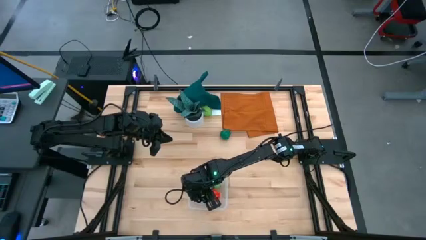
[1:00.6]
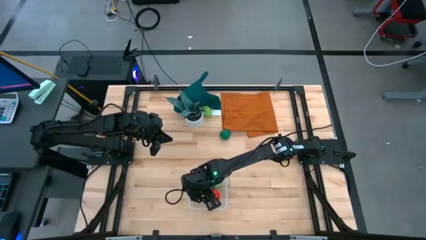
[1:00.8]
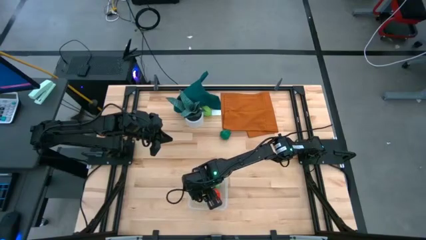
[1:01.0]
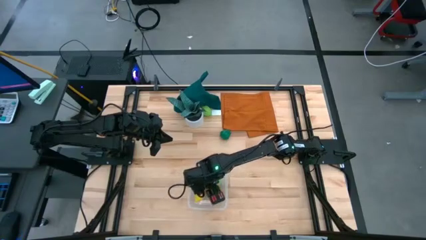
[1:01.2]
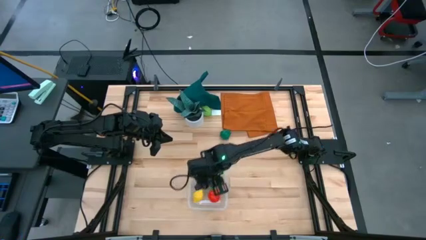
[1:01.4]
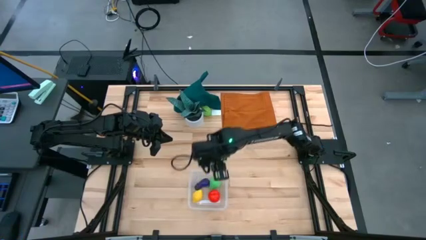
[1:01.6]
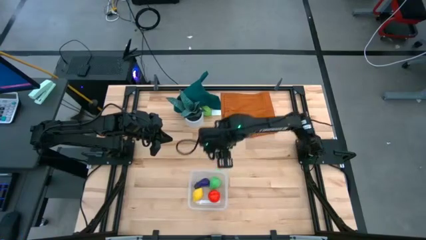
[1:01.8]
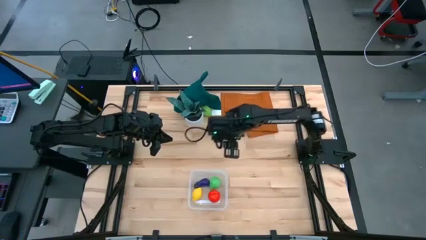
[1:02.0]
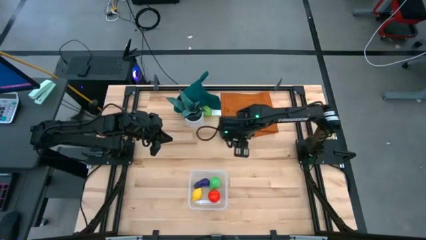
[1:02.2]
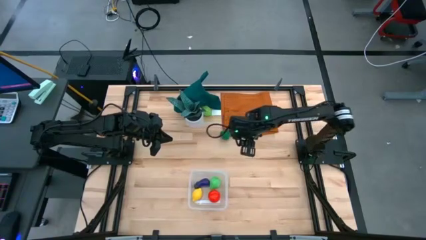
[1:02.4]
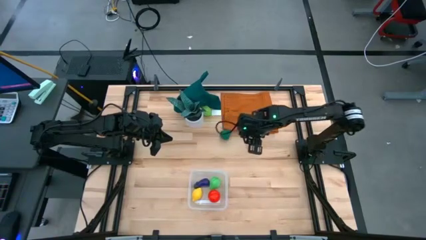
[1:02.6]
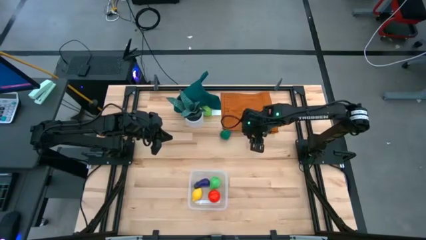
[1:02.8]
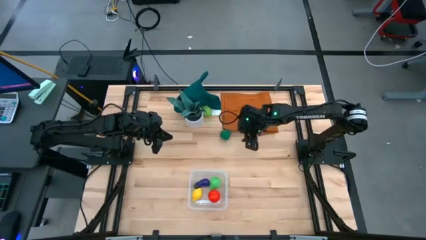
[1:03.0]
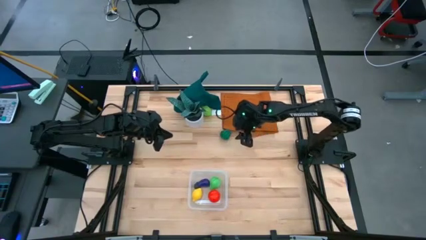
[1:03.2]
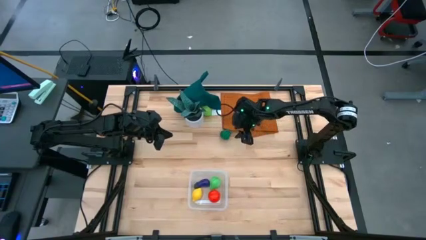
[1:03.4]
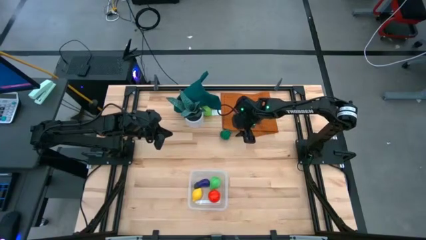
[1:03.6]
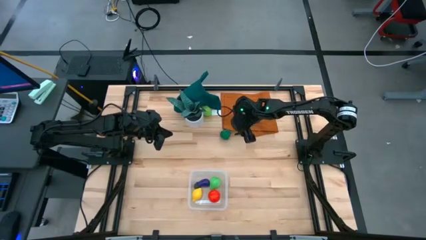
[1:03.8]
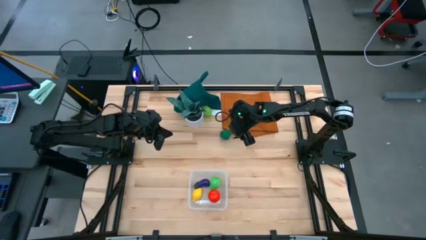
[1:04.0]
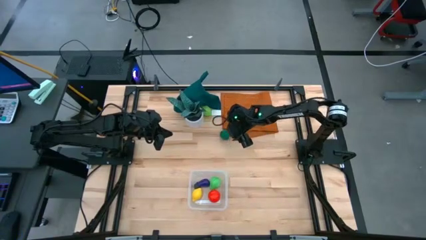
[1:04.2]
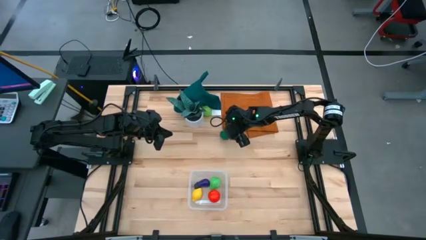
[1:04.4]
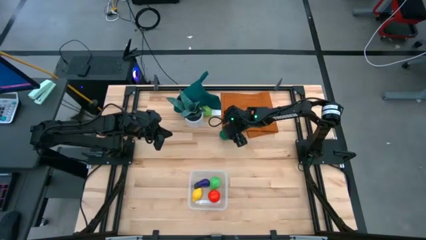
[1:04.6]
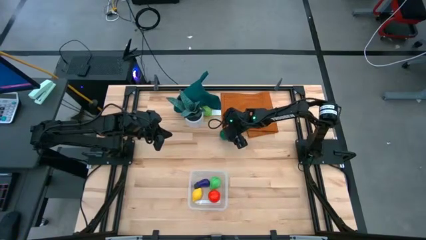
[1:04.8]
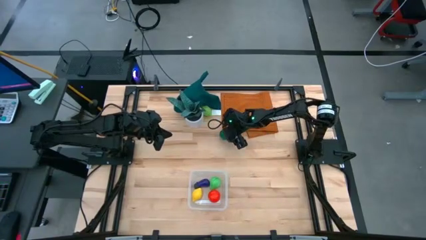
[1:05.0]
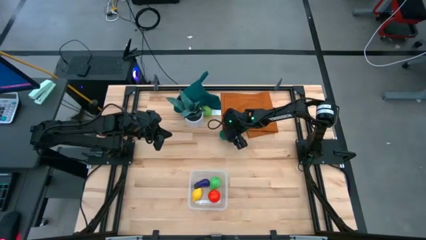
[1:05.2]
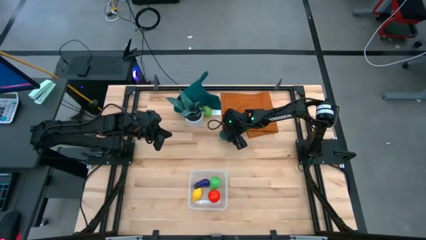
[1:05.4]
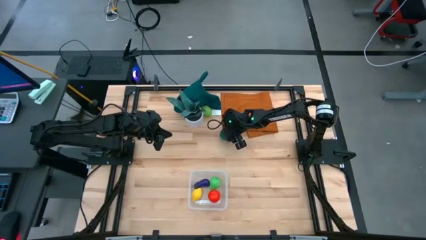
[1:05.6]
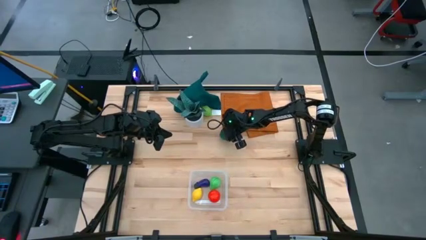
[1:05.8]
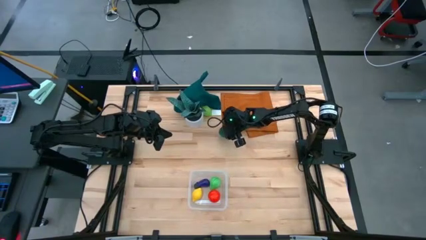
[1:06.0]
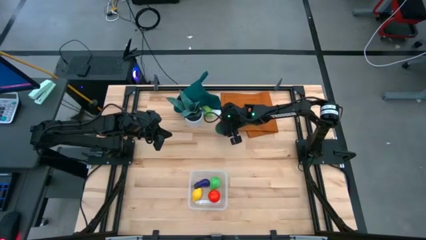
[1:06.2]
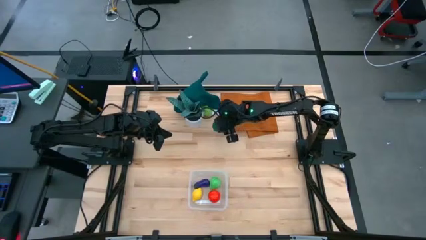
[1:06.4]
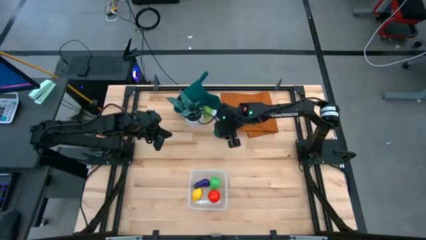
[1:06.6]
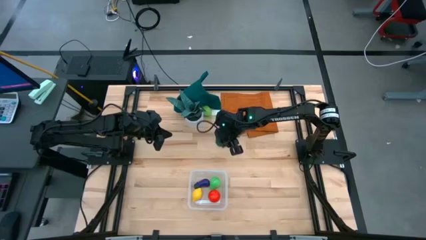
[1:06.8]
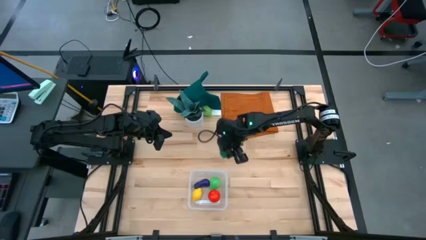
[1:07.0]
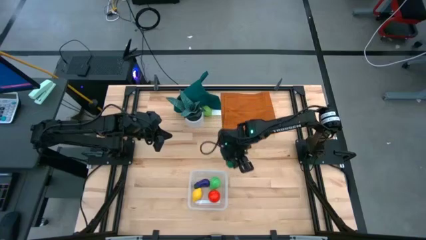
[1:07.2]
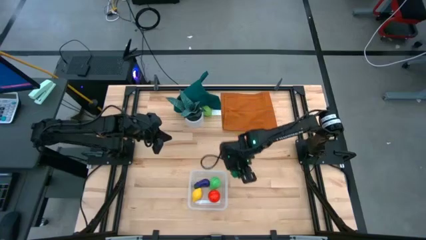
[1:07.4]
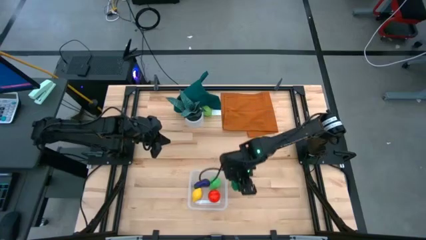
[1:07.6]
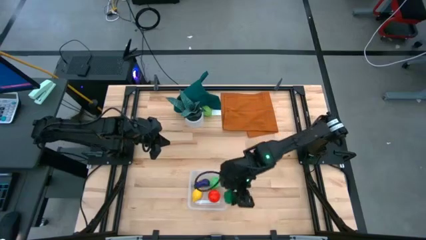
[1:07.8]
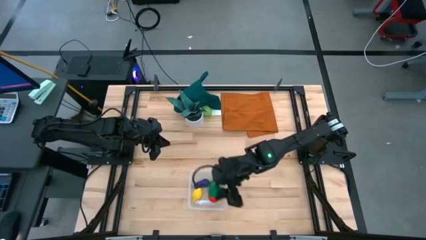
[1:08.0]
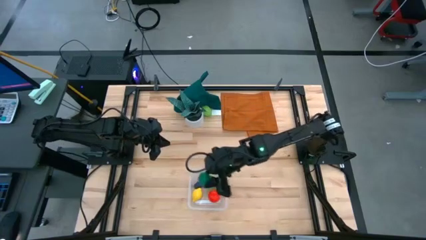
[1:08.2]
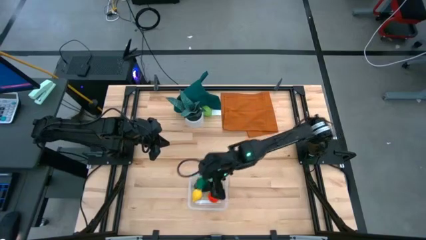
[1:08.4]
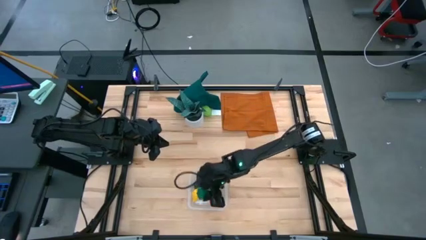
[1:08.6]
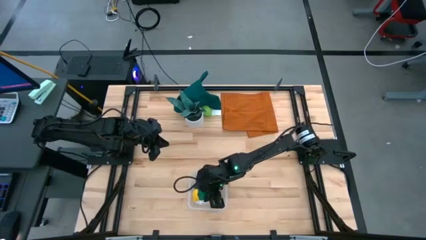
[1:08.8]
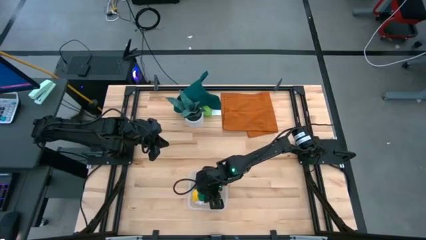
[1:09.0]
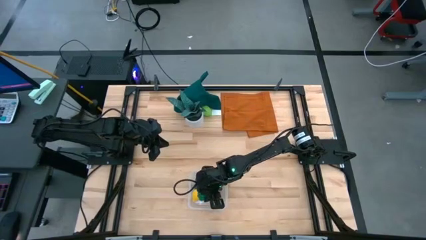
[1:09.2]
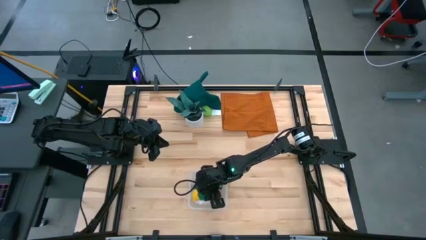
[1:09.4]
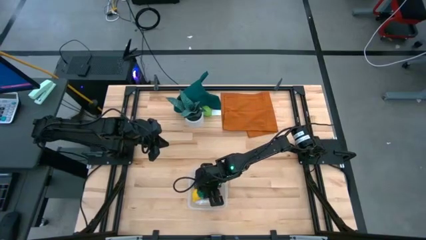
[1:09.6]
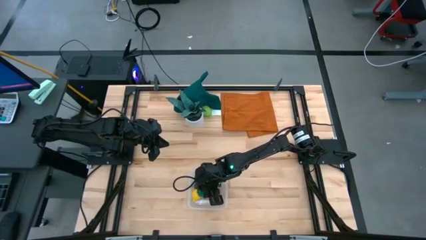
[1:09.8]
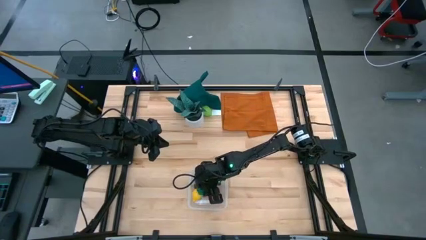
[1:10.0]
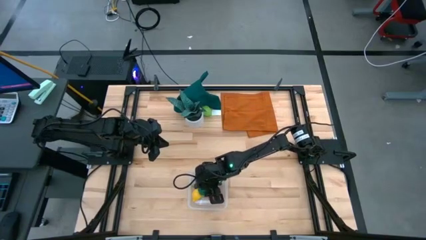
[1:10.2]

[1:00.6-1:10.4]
Task: Pick and placing Produce into tupperware
Put the bell pepper into the transparent bin

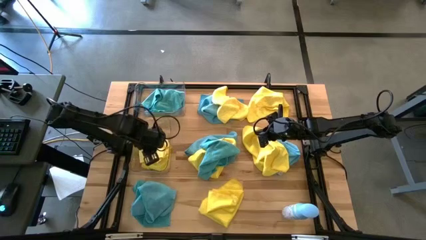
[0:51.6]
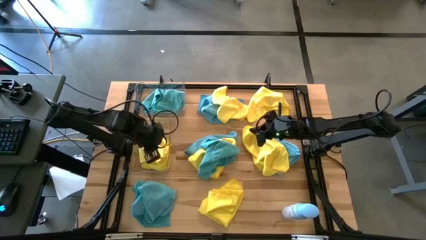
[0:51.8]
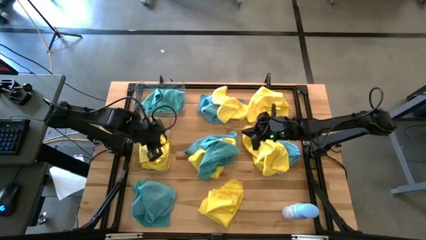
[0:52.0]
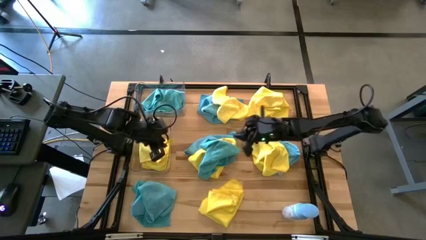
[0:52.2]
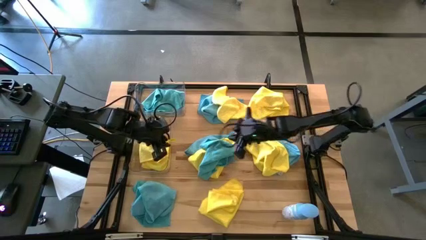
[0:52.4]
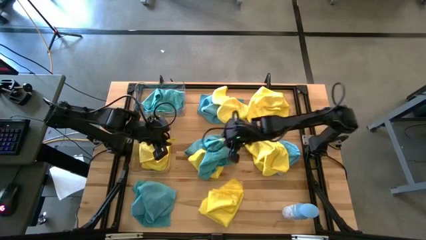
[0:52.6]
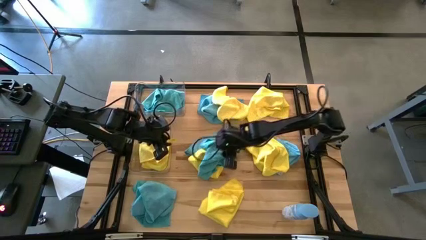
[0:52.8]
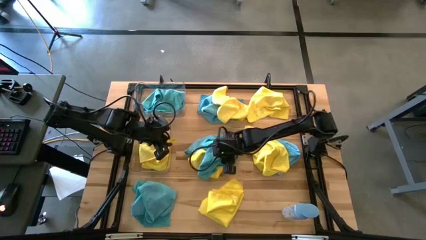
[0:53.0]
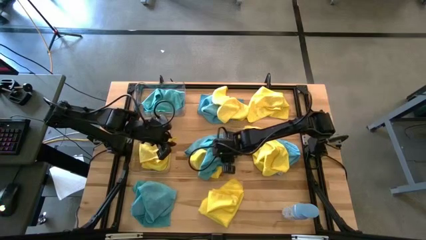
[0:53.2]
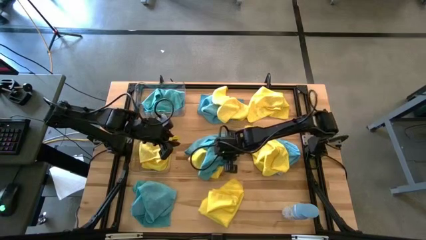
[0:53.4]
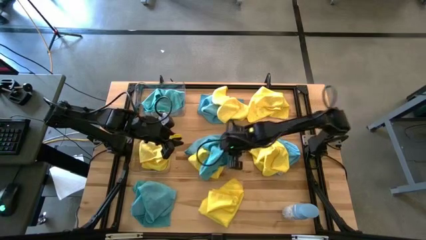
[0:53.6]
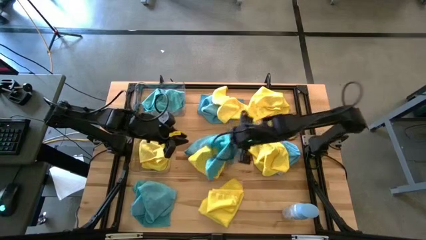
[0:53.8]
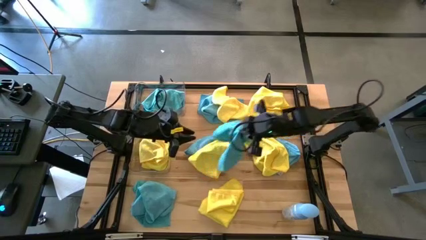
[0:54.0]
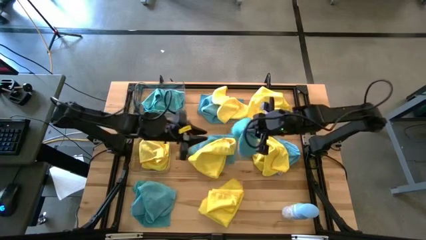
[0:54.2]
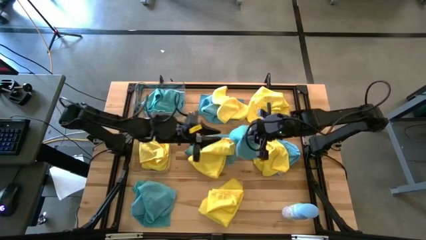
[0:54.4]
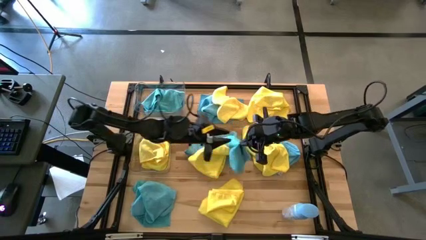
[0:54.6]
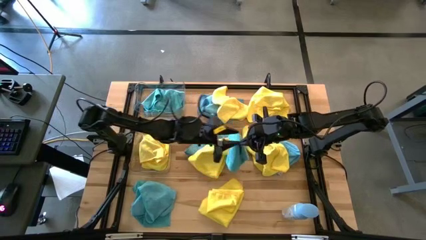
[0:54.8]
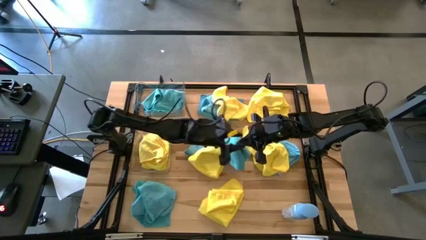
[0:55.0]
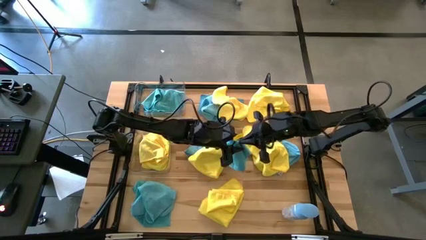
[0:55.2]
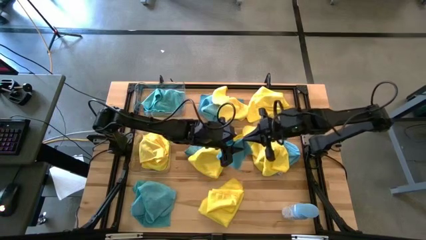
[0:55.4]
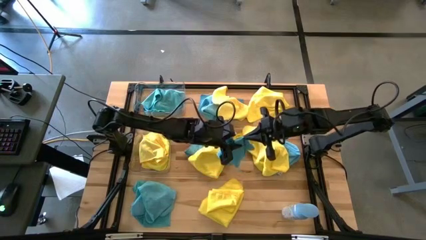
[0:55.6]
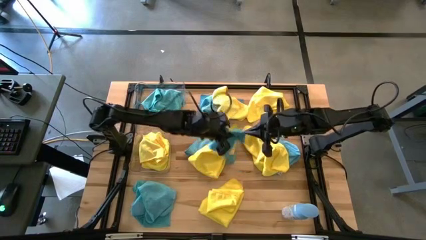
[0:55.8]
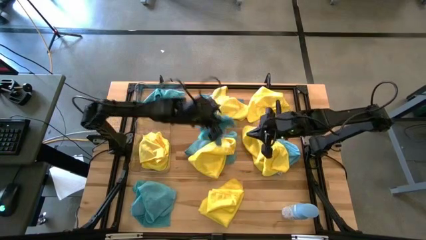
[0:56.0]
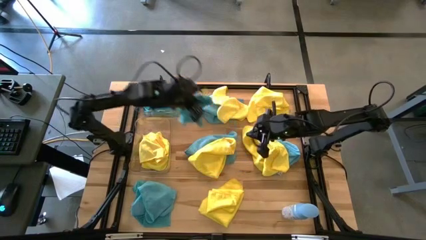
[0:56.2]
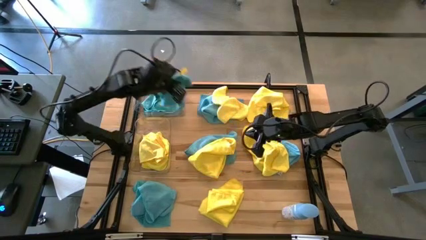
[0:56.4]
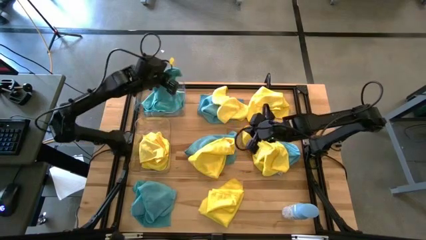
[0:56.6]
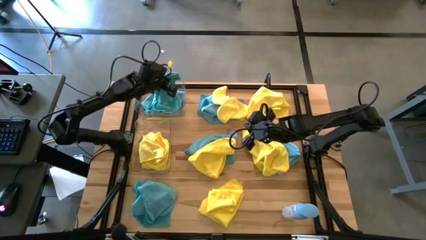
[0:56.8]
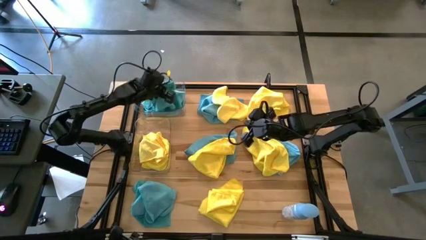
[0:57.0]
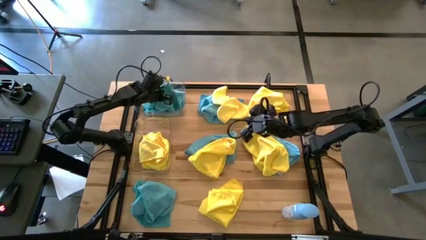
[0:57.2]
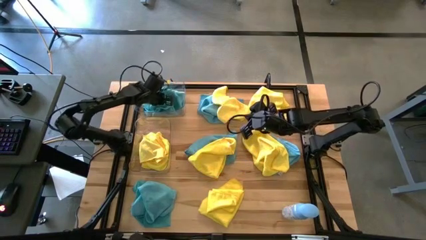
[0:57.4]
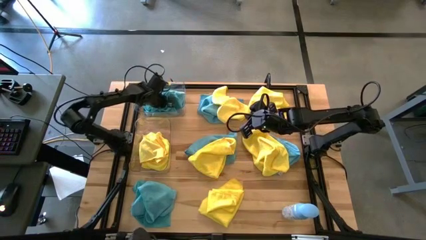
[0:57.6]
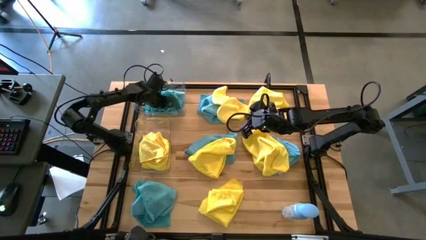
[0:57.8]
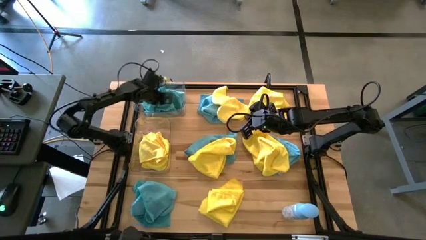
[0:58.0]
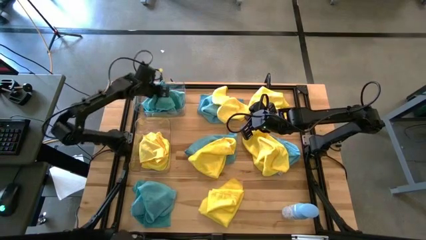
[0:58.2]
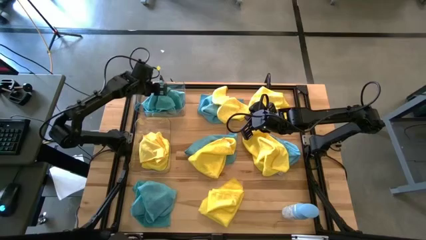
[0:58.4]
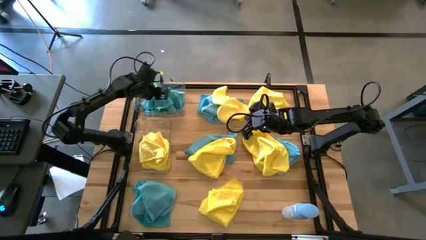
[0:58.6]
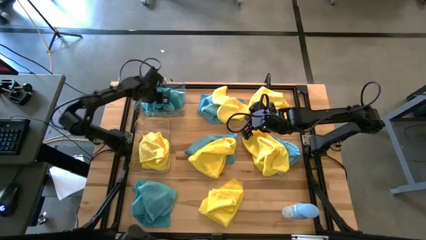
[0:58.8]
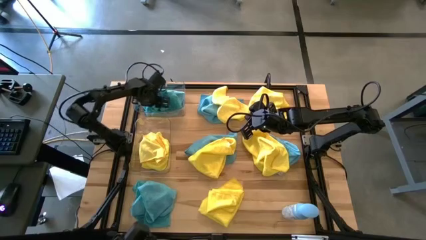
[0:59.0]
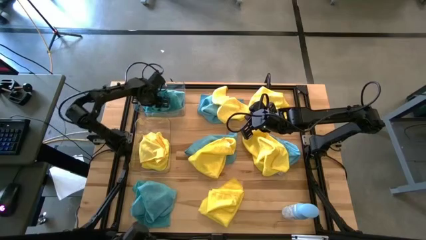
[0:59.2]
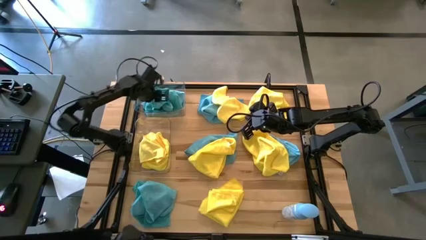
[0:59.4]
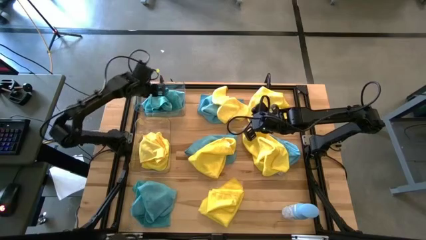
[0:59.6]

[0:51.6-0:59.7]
Task: Sort microfiber towel by color & place in baskets
Put the blue microfiber cloth into the top transparent bin
